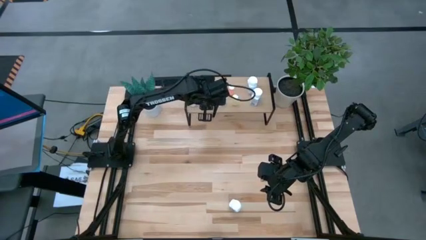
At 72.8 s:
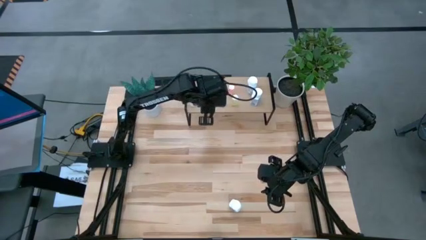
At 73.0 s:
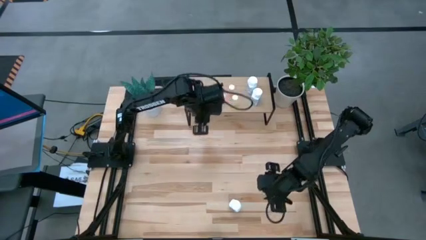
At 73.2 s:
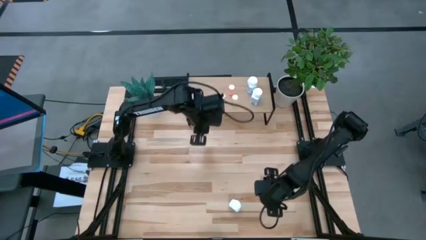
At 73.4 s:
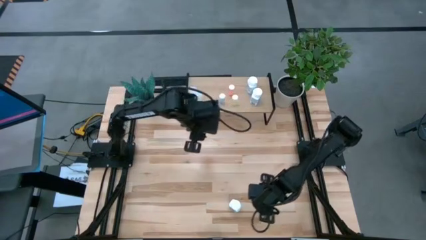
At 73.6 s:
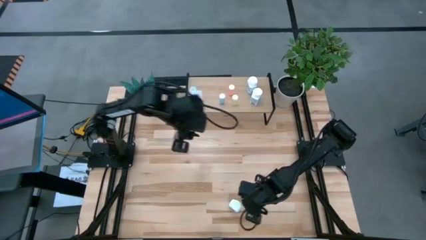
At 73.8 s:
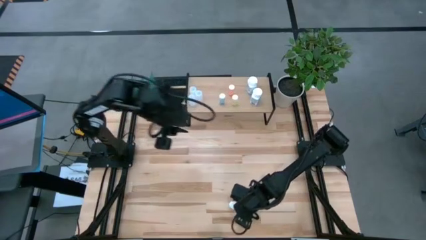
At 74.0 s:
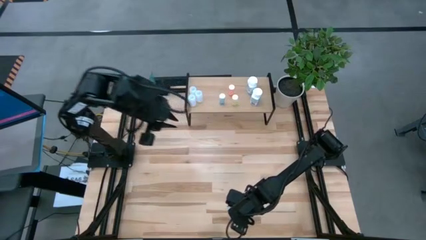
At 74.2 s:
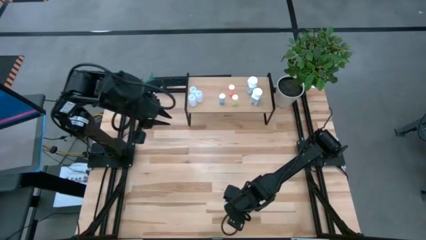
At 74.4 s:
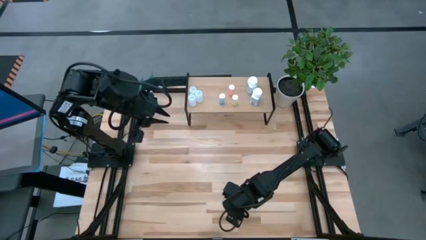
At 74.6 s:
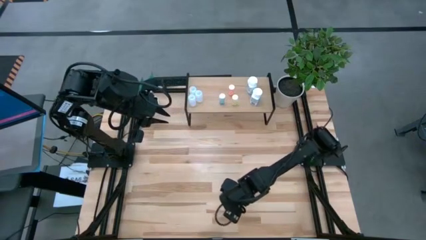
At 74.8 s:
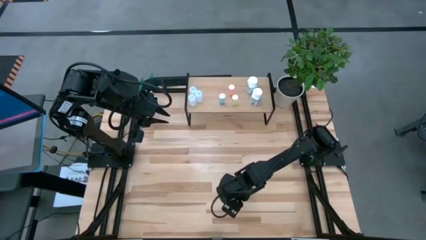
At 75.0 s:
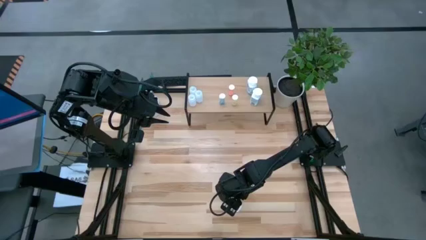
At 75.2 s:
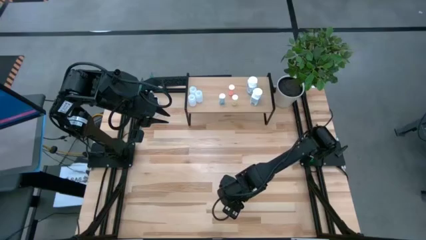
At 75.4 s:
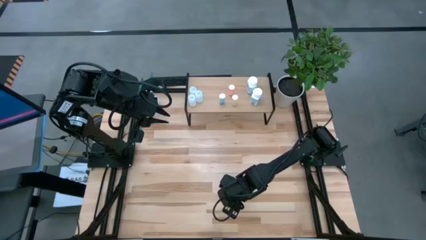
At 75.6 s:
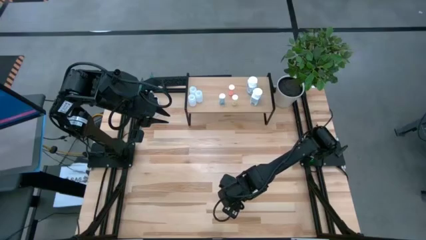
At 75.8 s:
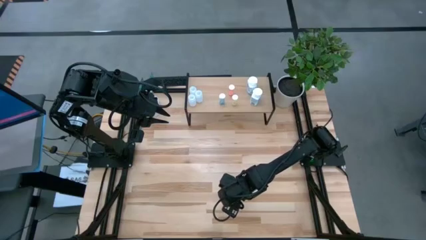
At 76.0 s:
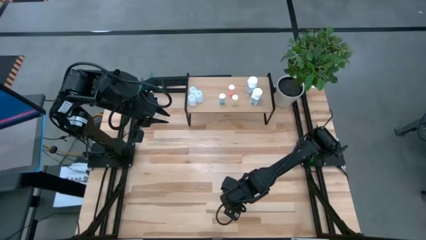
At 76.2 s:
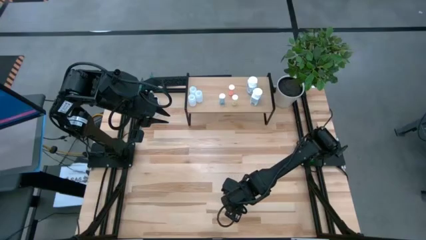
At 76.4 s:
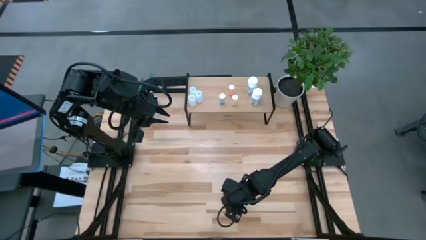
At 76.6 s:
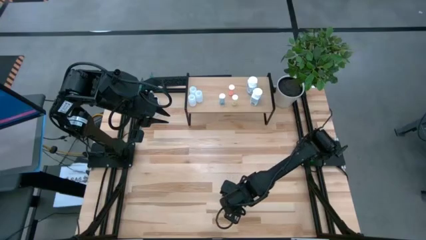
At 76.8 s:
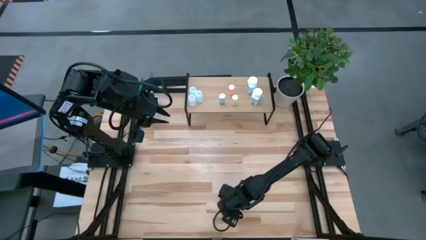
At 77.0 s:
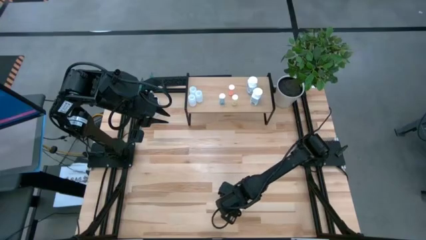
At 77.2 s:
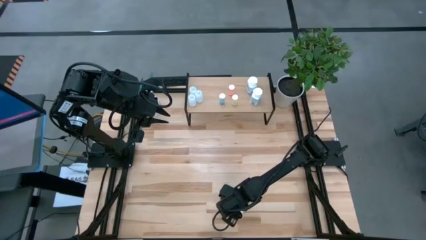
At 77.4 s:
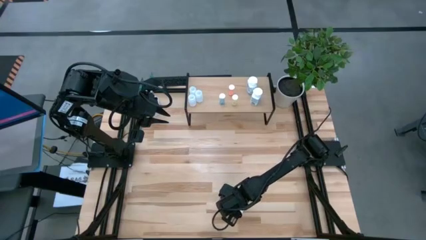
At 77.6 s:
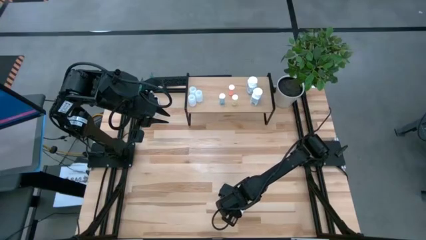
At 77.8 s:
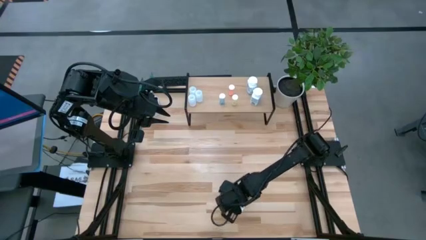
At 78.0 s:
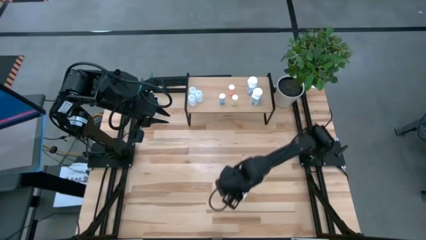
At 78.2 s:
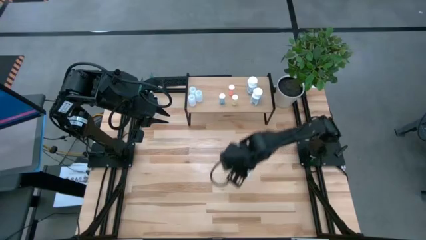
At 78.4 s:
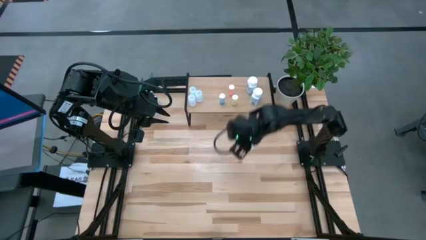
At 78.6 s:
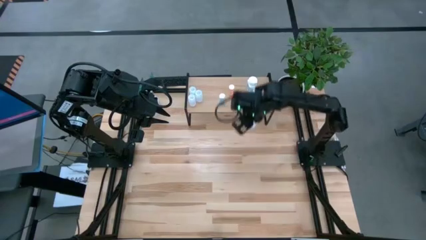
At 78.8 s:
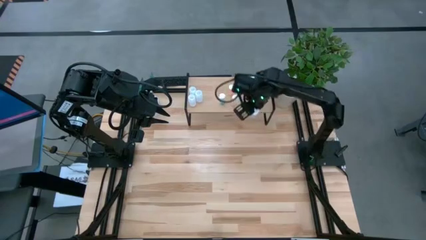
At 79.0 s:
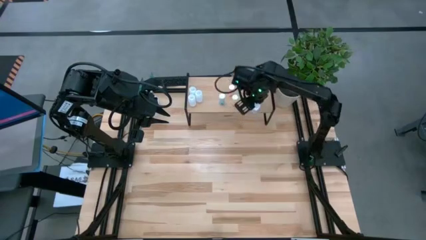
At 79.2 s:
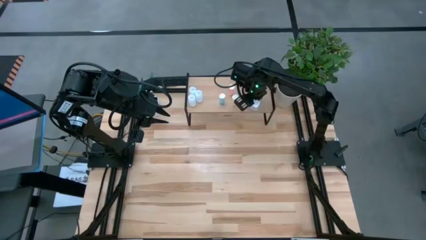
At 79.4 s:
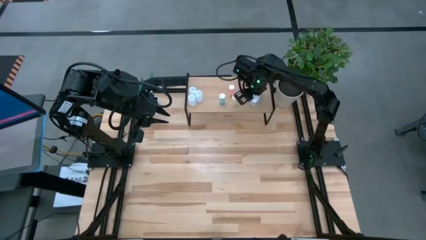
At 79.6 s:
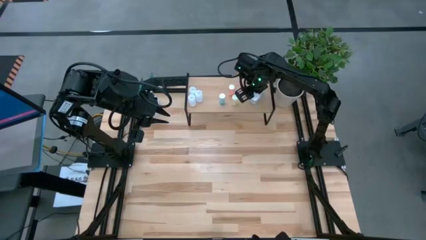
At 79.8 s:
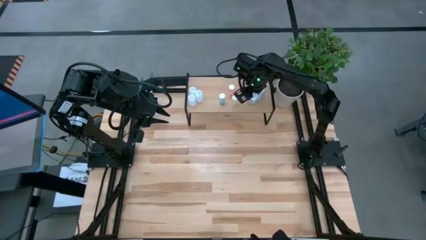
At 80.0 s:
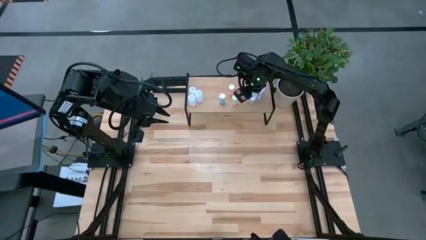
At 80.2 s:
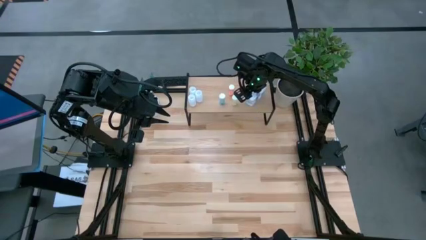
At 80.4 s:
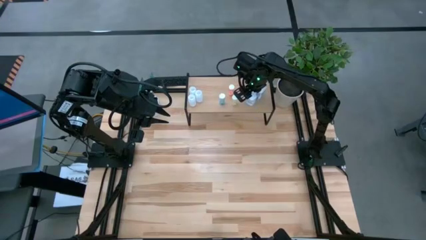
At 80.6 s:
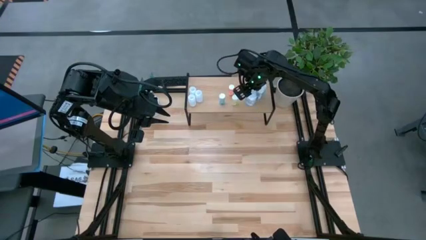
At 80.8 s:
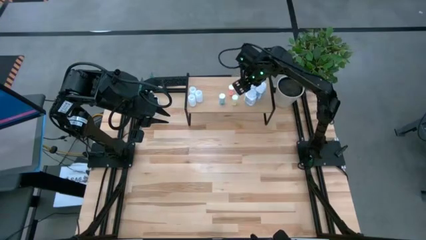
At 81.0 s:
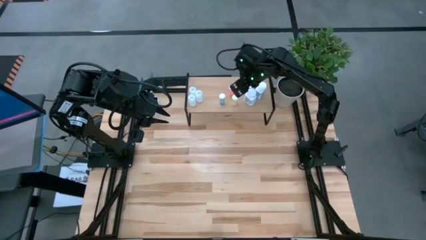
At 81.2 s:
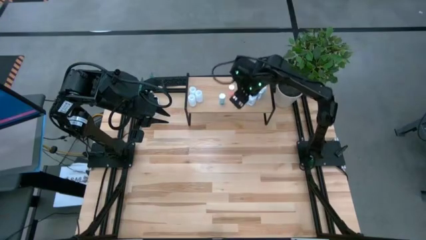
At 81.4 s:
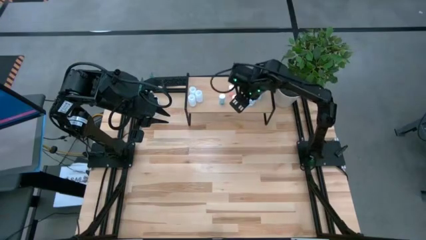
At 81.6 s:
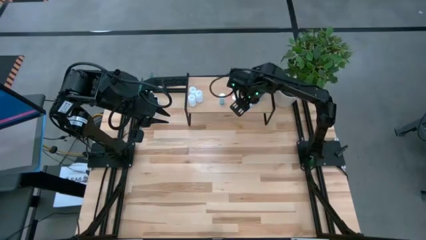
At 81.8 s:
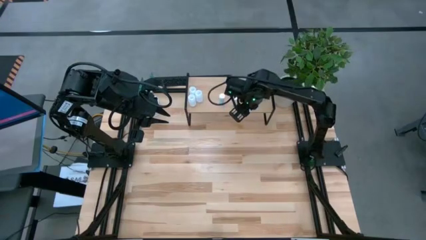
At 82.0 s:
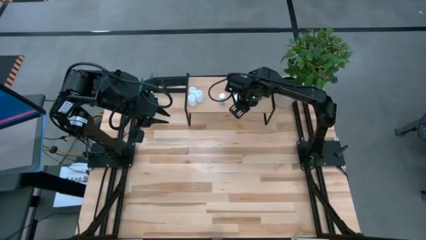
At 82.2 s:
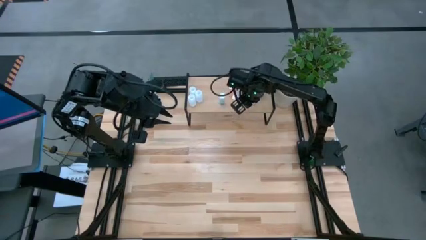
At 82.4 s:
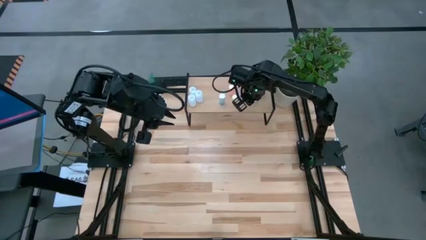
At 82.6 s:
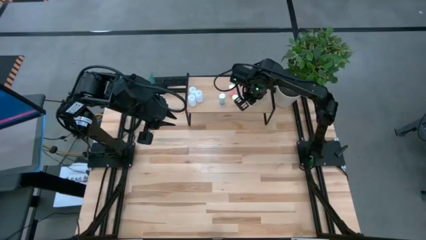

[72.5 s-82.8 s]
Task: Pick and place medicine bottles onto shelf by color
Put the large white pill bottle on the shelf

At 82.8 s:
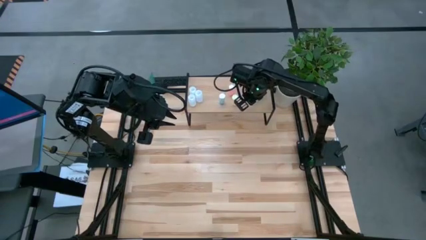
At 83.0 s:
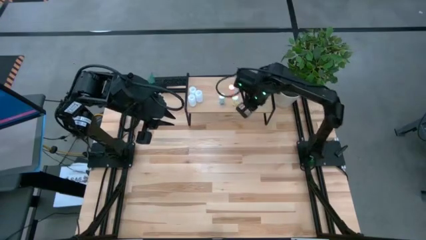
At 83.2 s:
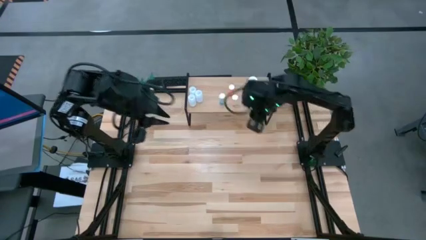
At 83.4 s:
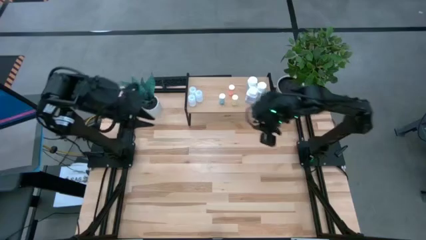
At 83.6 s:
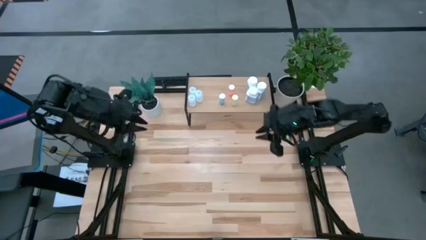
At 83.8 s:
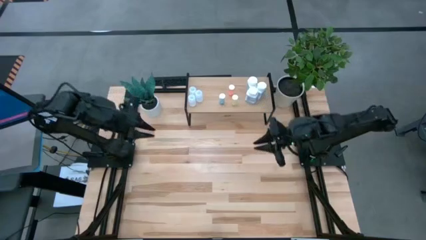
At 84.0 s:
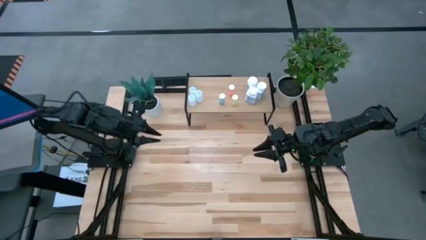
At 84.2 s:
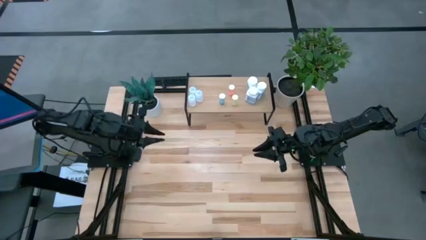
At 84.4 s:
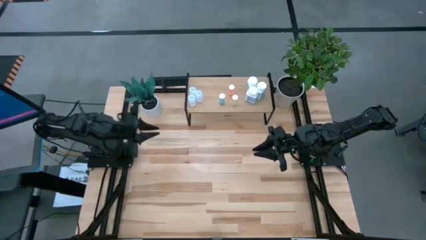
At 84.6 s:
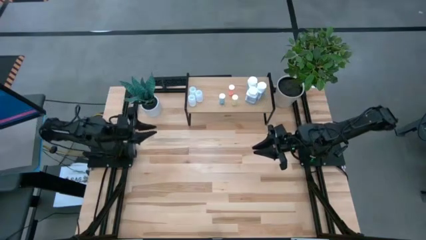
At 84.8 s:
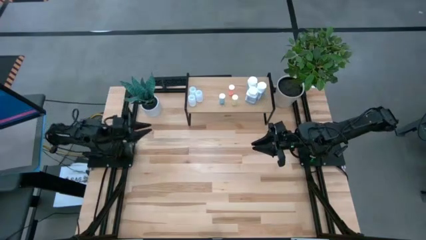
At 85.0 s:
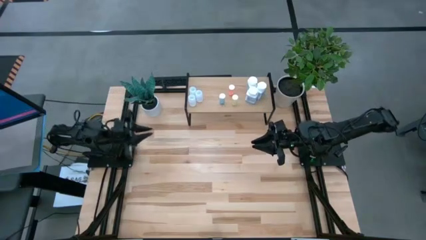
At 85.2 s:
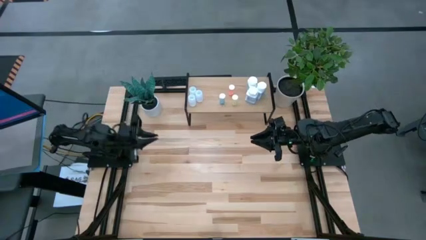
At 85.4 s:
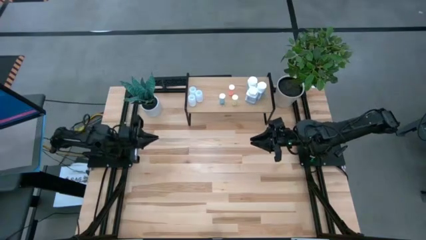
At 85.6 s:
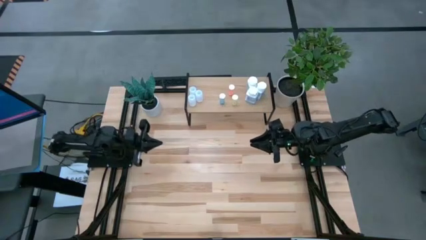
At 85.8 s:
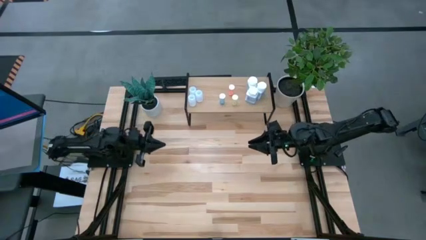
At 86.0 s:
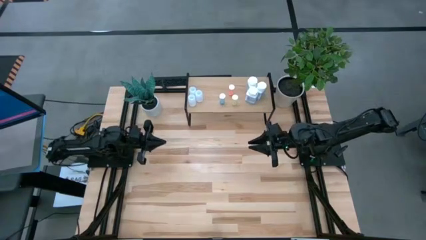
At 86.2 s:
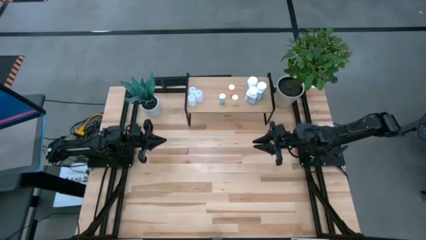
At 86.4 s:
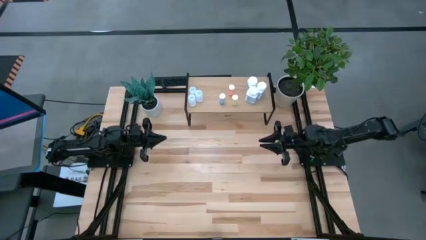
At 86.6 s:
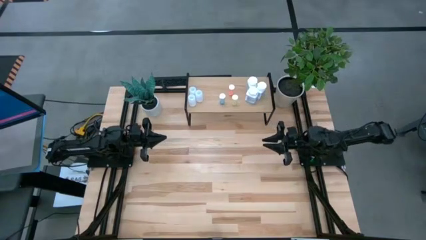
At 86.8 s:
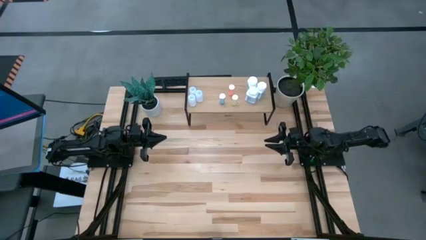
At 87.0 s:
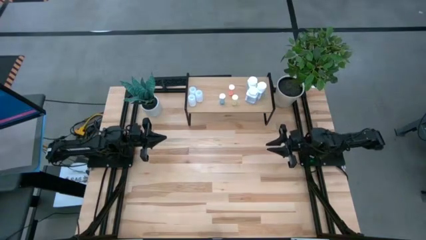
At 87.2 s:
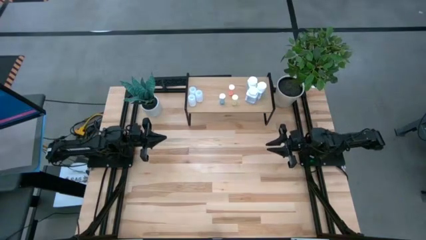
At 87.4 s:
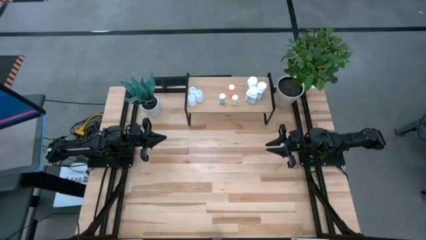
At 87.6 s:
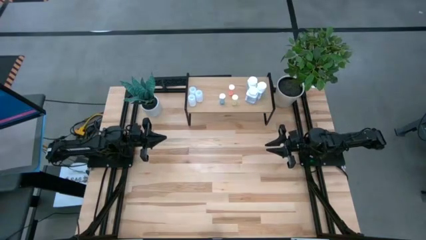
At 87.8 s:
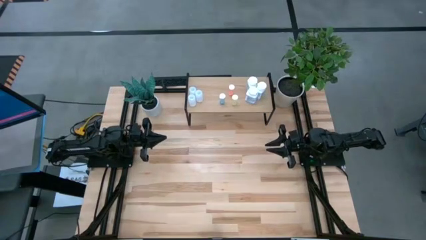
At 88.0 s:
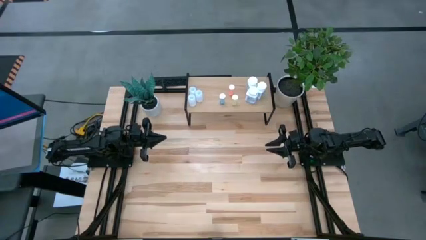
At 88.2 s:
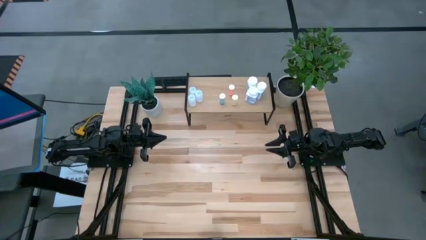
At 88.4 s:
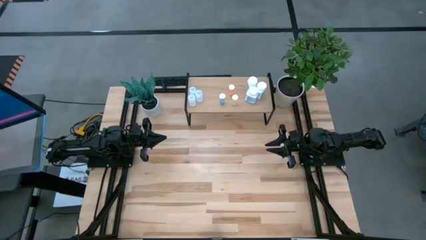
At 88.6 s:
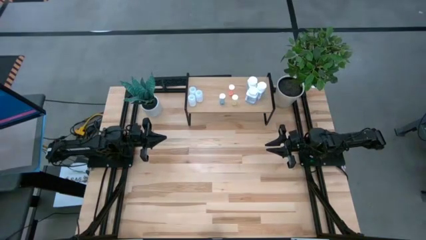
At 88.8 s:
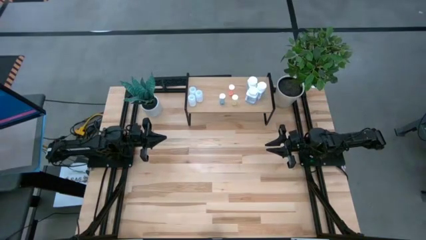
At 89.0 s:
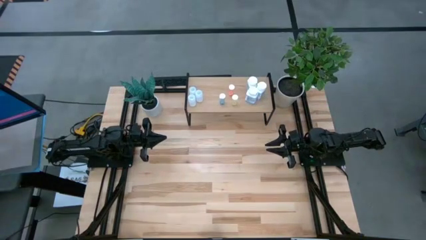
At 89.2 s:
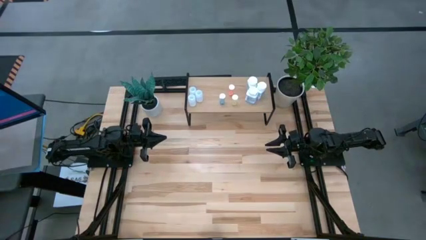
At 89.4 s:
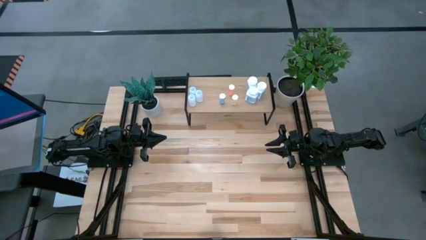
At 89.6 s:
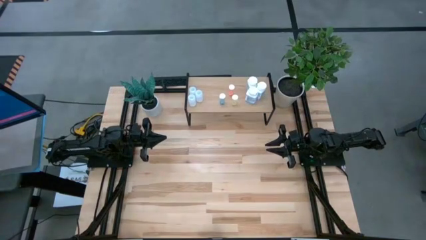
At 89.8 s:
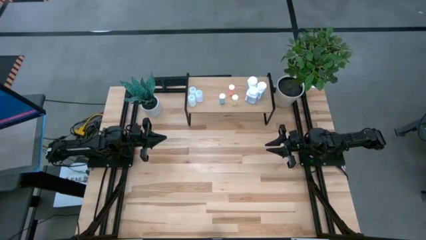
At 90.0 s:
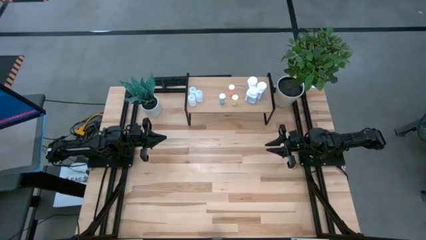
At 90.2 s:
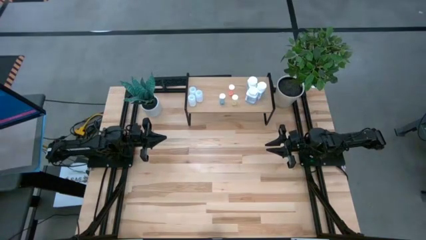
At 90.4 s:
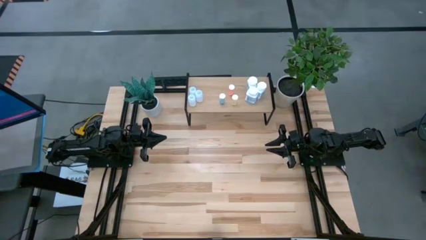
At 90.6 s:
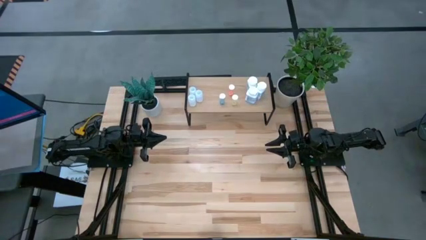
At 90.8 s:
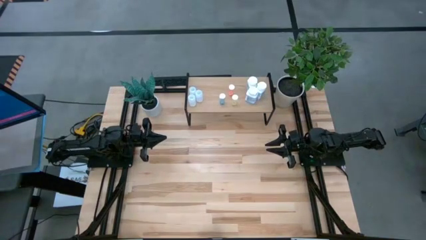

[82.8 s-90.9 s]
Return to Home Position
